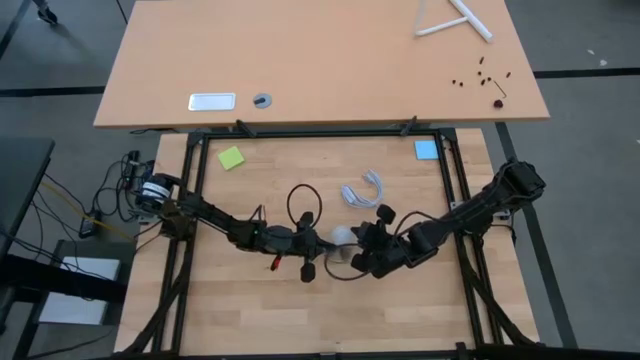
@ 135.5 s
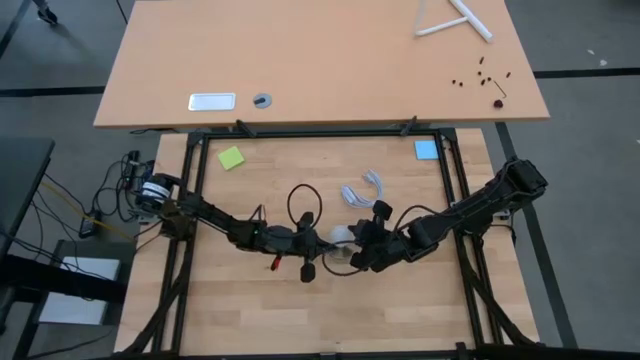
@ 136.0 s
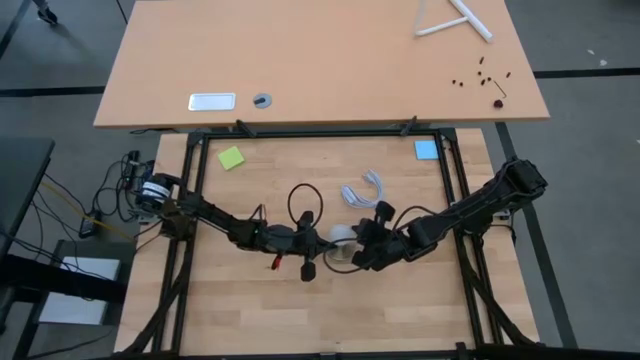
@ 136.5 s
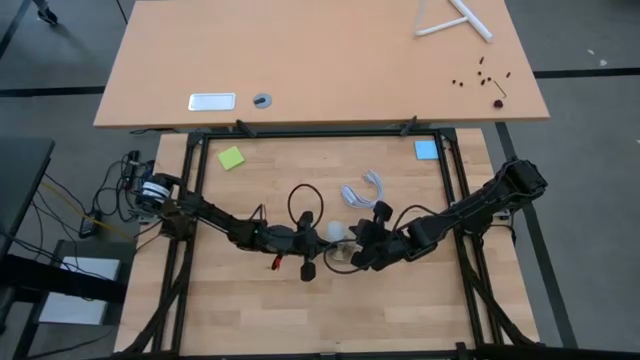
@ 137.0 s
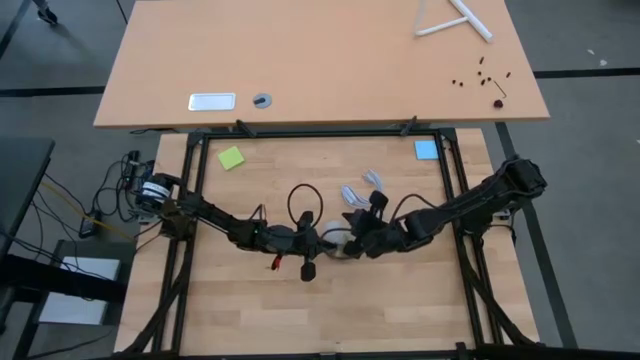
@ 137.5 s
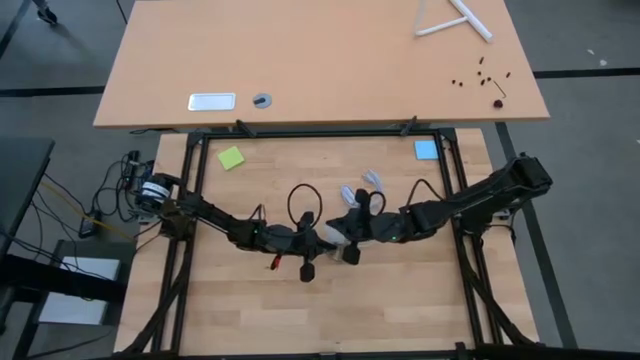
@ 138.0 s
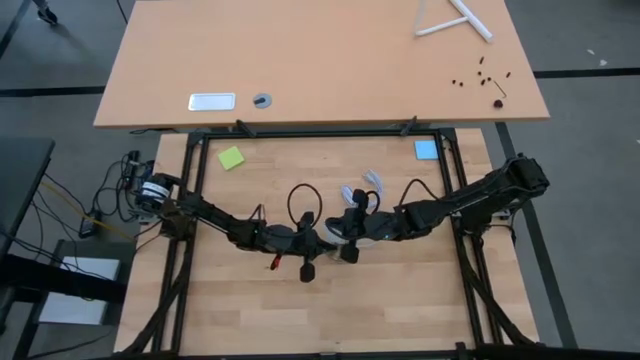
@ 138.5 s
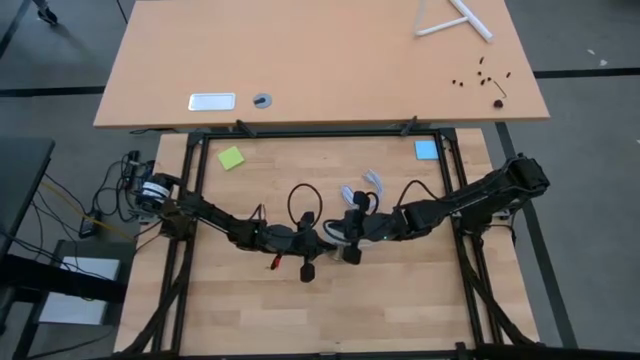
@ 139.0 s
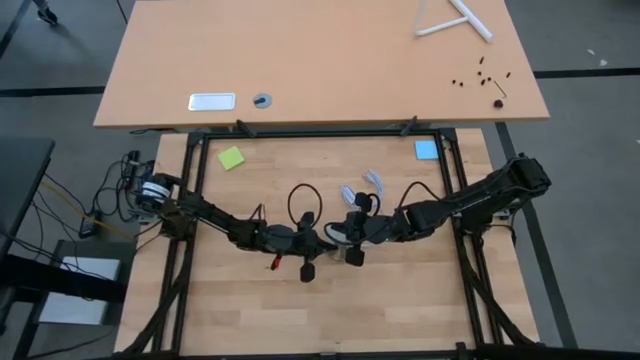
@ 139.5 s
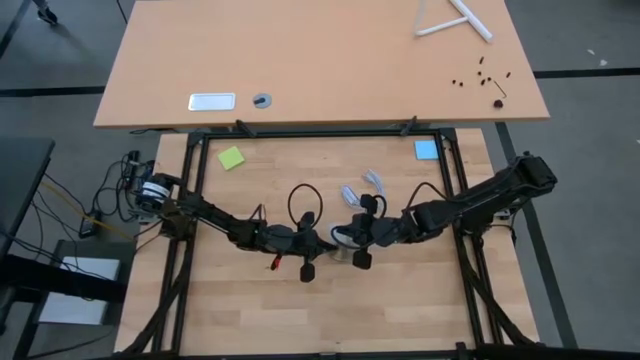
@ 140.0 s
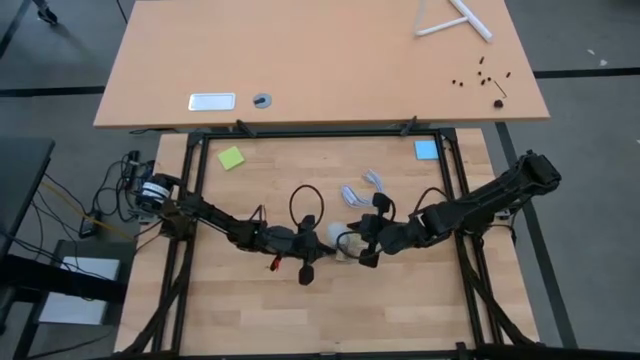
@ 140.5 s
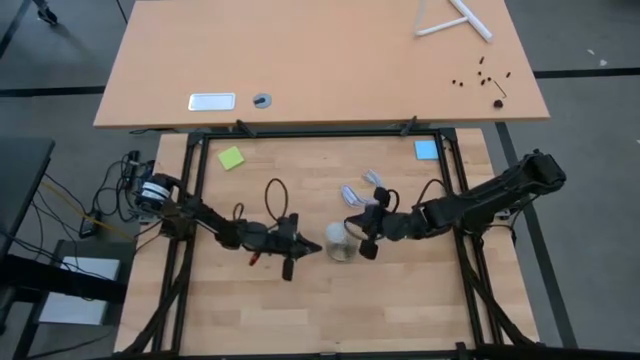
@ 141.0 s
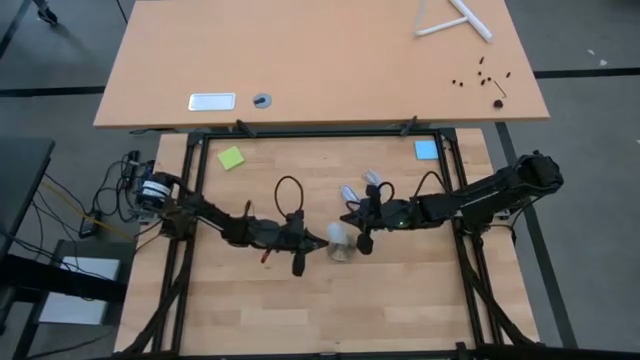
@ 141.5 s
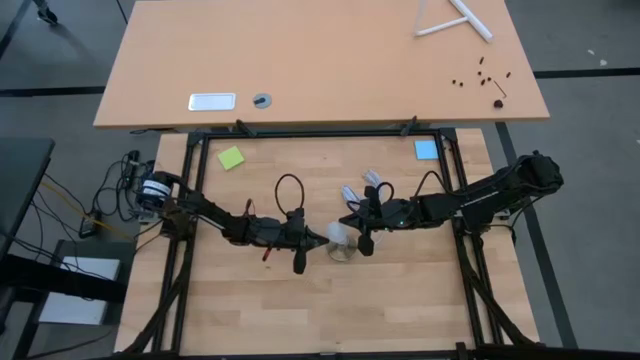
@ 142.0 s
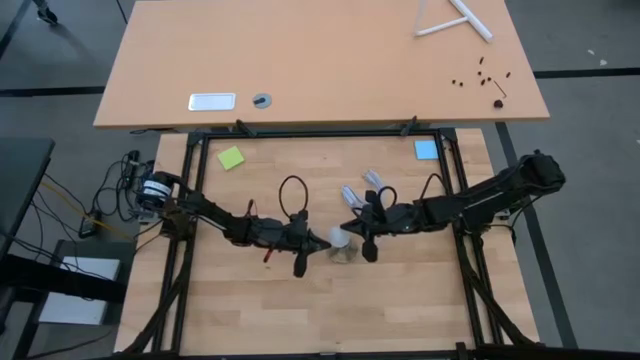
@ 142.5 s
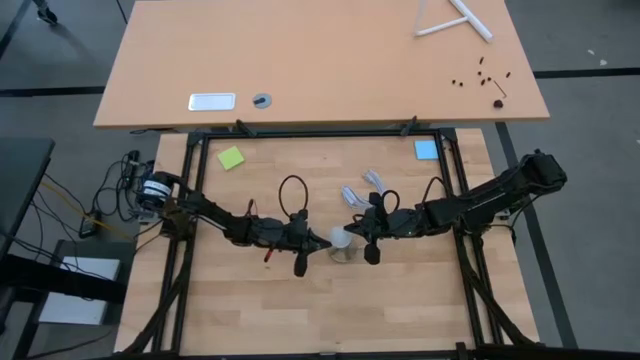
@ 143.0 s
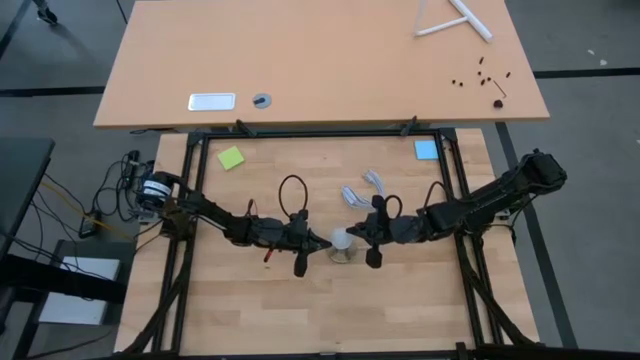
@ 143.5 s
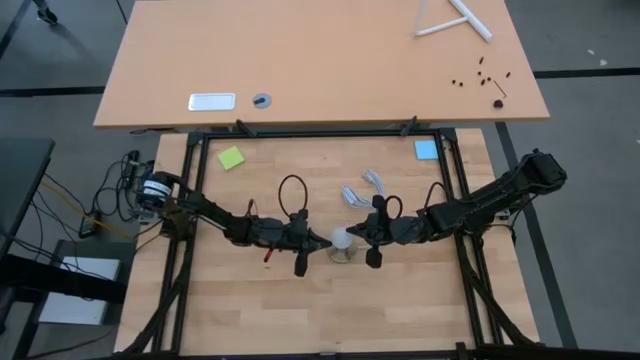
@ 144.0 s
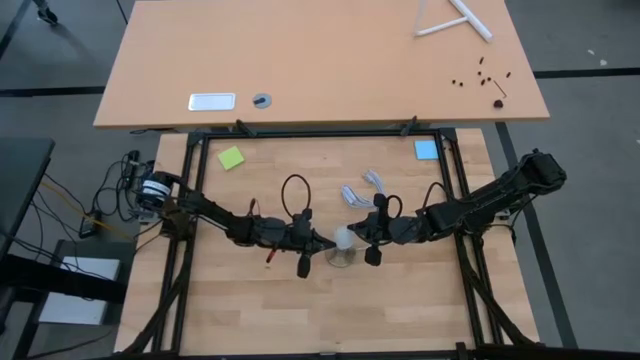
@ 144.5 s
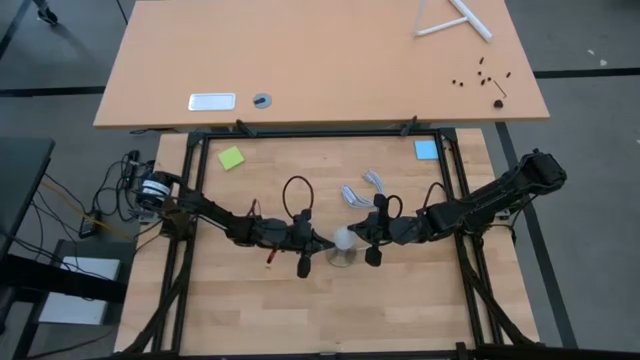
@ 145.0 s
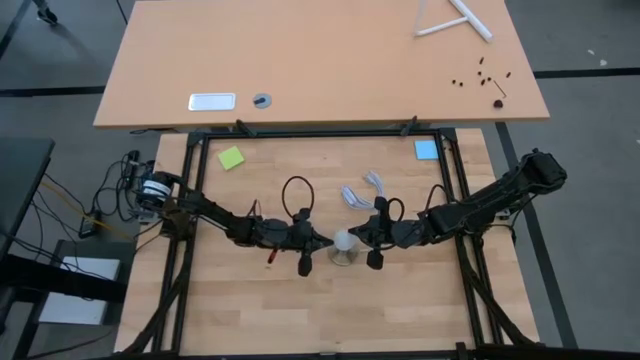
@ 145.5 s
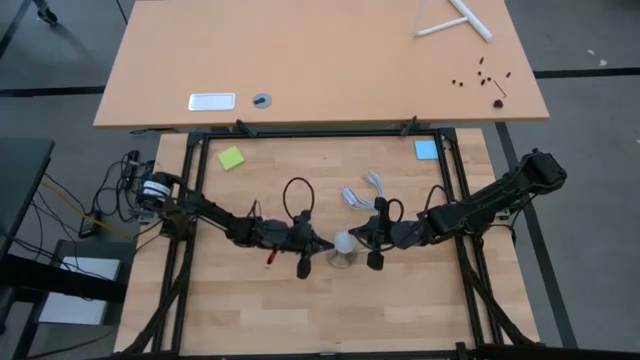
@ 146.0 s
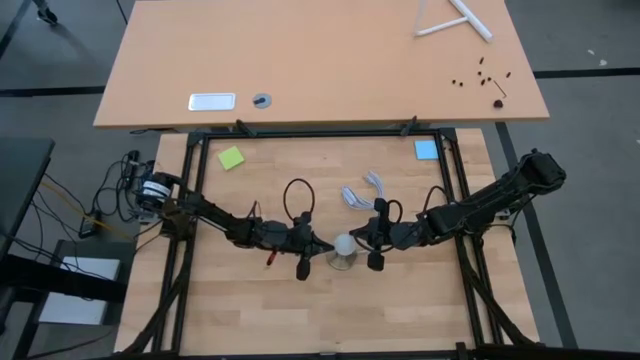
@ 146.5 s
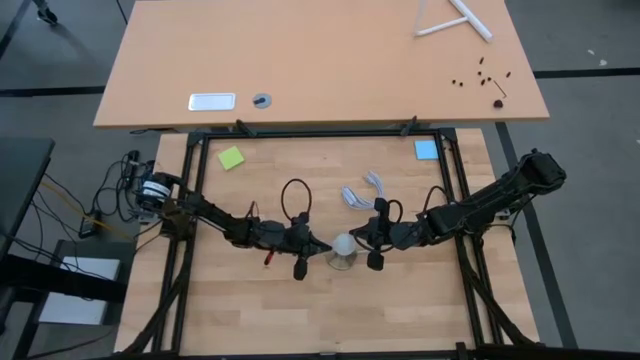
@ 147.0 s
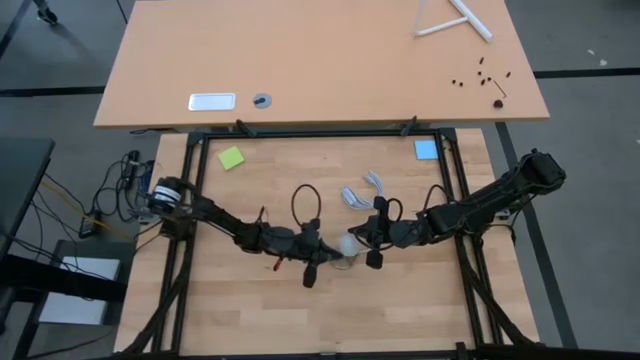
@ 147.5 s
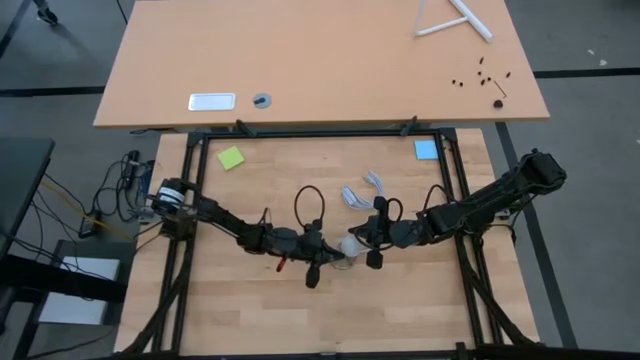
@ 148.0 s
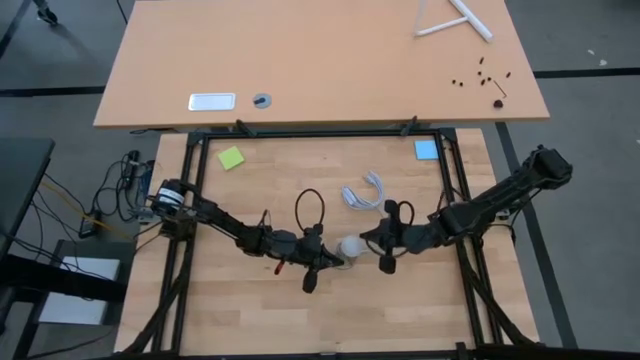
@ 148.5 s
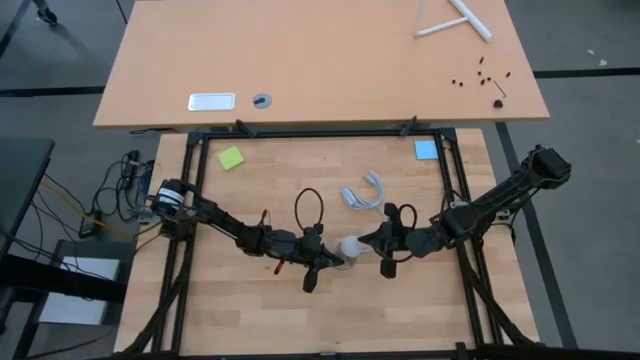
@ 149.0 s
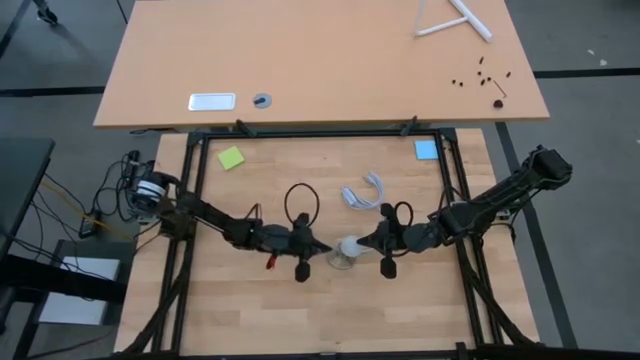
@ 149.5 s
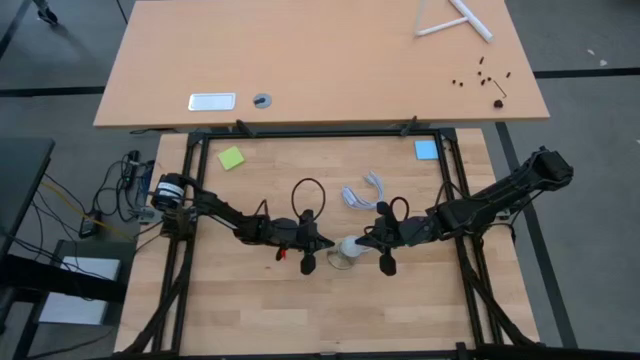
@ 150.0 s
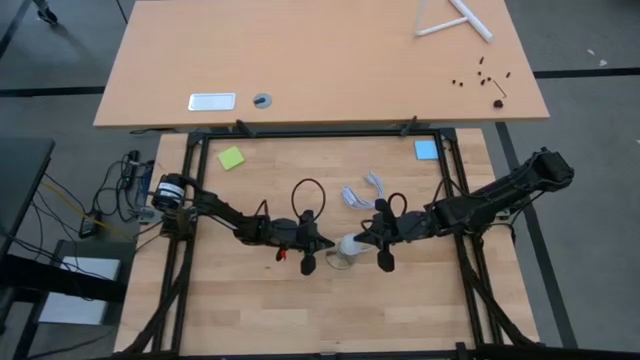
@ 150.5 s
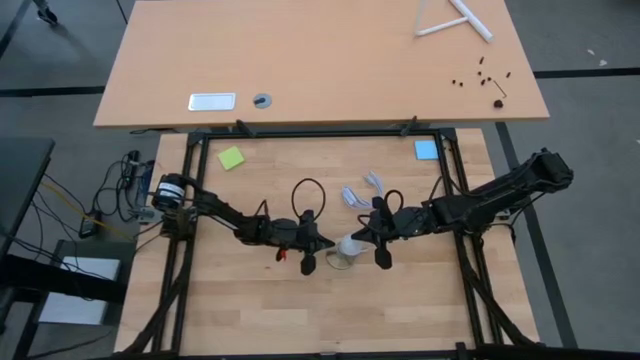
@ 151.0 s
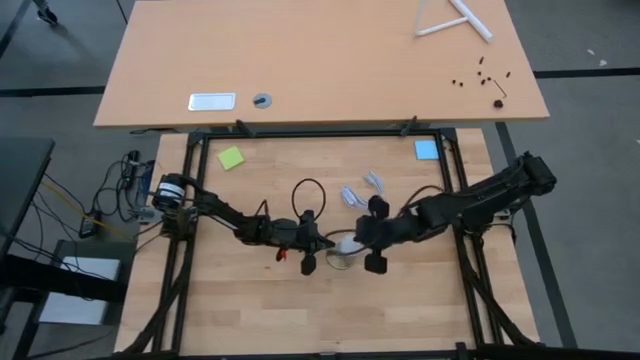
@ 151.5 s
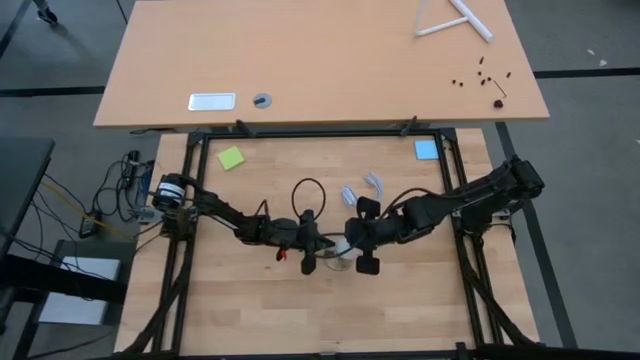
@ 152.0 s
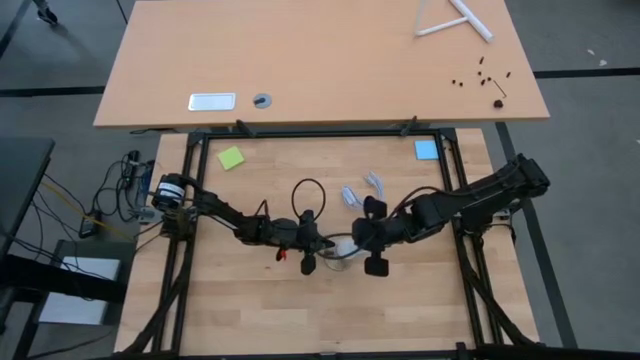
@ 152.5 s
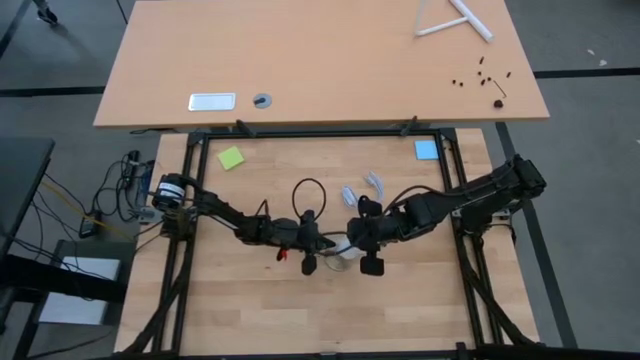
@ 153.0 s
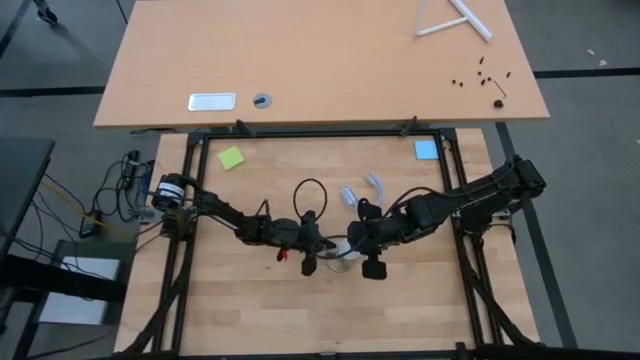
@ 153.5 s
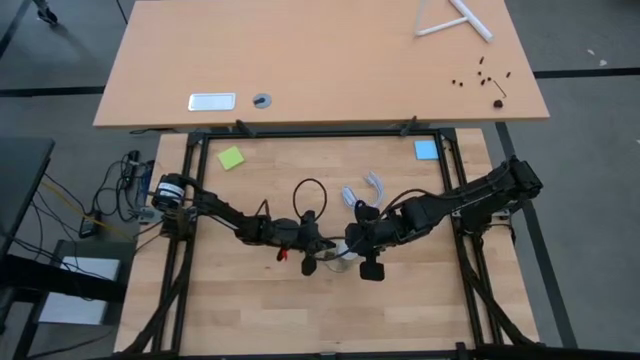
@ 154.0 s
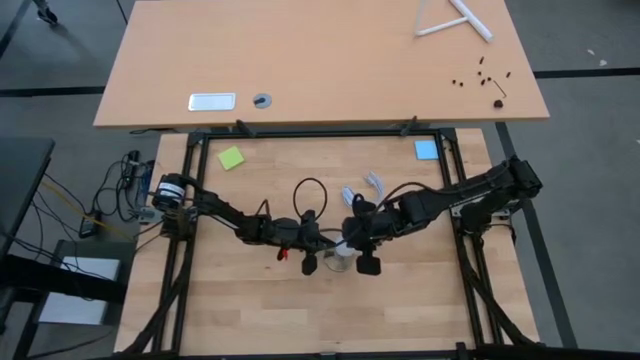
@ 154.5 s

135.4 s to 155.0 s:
Task: Screw lightbulb
Insert the lightbulb into the lamp
